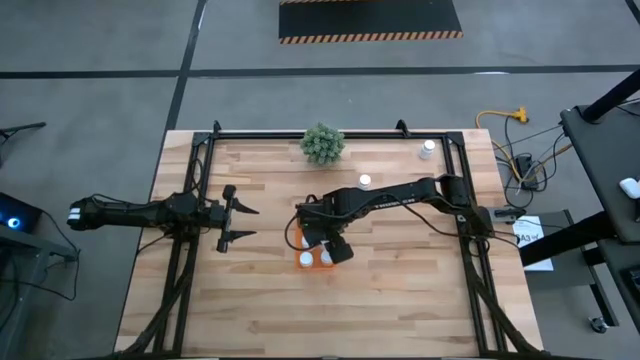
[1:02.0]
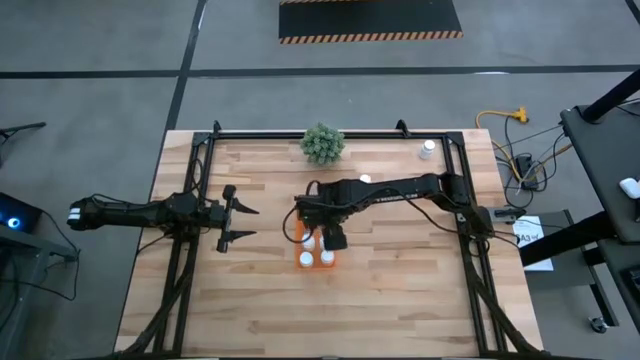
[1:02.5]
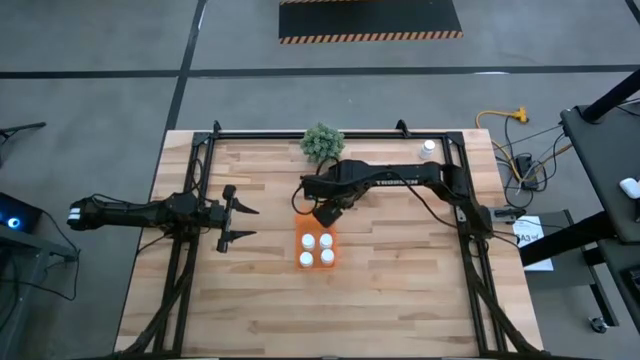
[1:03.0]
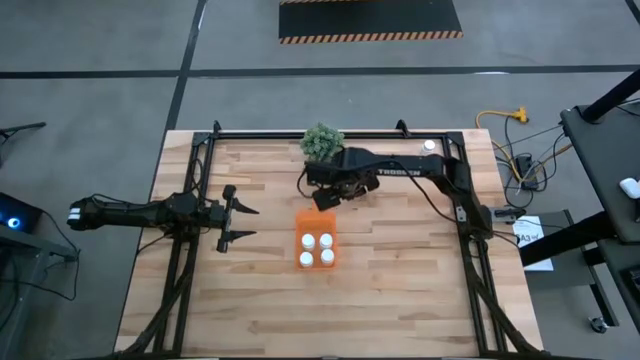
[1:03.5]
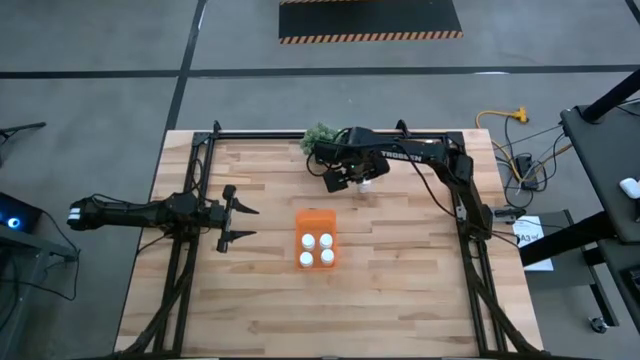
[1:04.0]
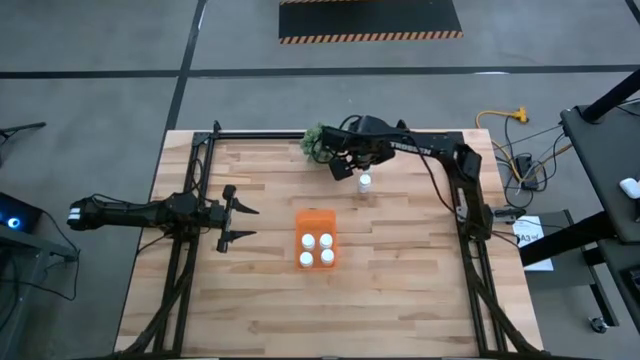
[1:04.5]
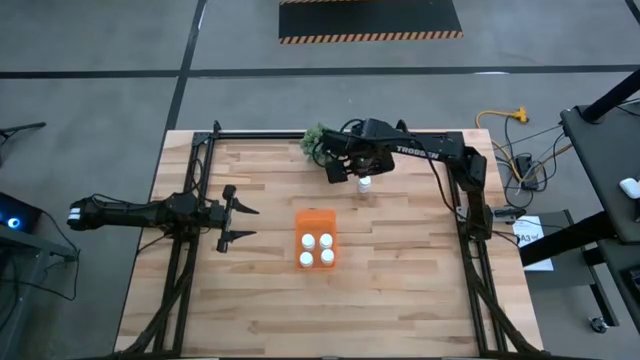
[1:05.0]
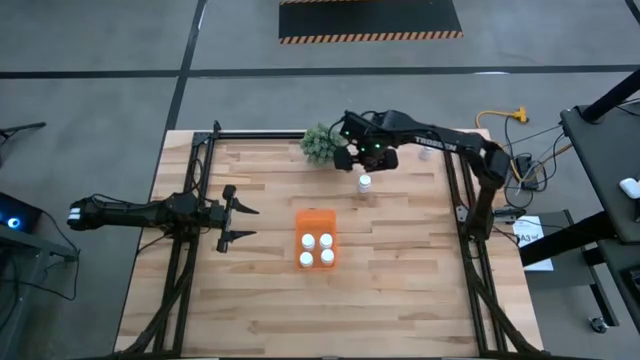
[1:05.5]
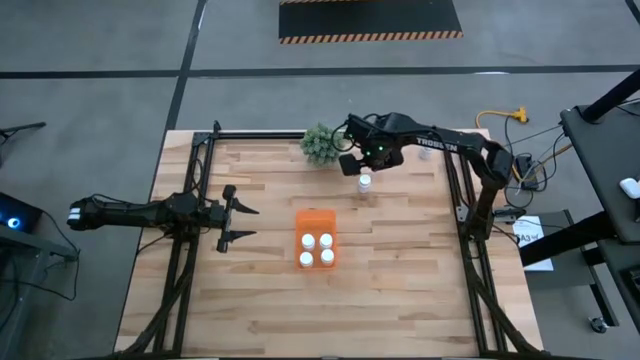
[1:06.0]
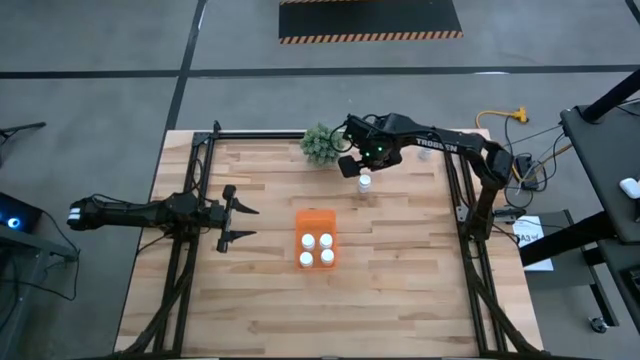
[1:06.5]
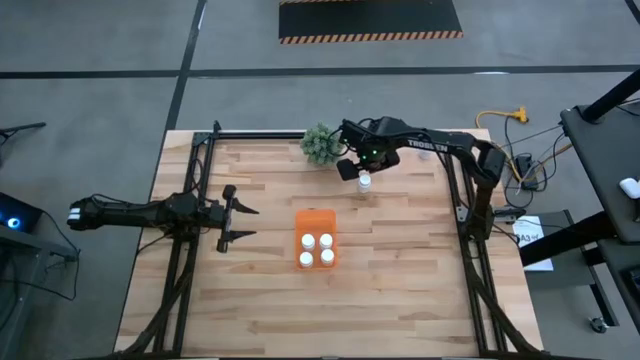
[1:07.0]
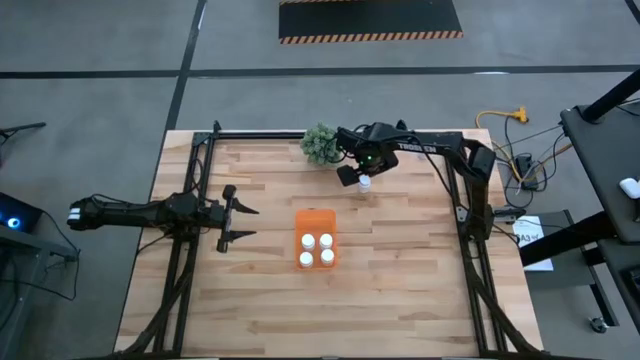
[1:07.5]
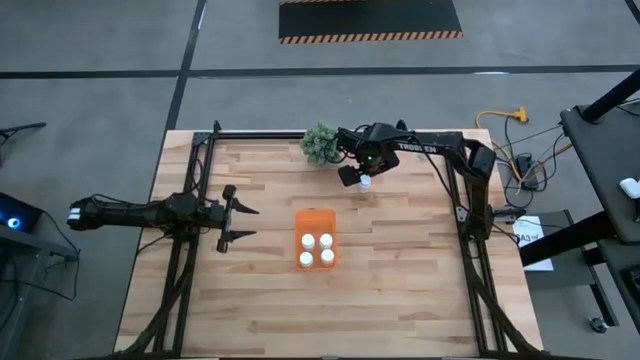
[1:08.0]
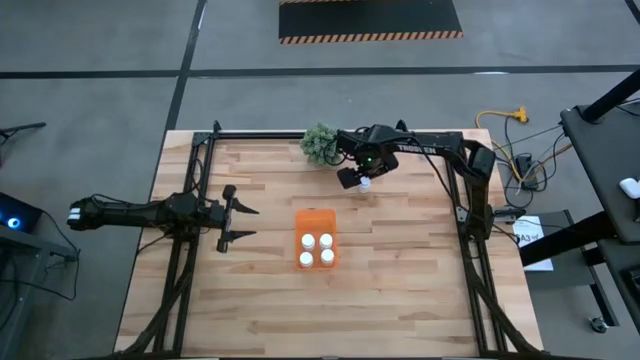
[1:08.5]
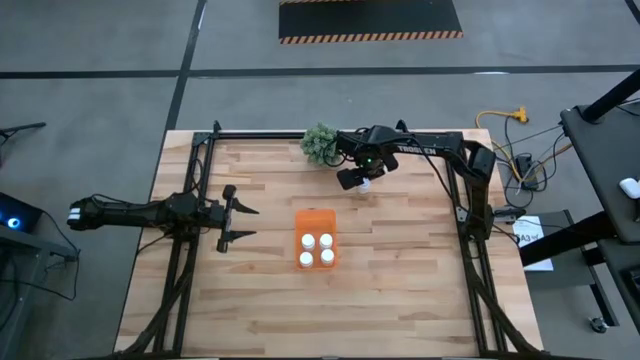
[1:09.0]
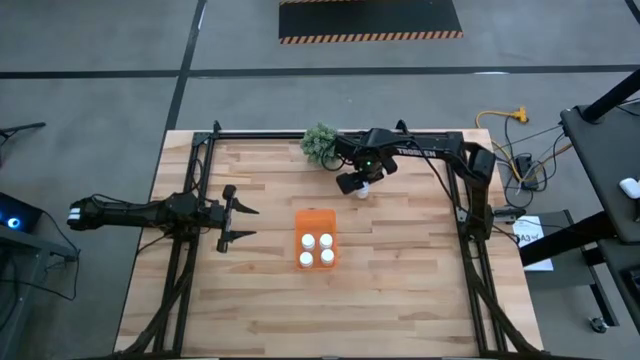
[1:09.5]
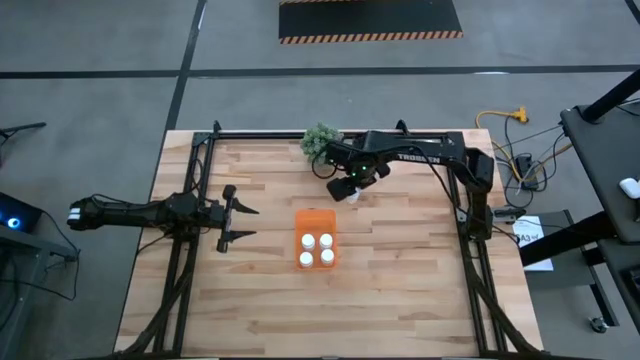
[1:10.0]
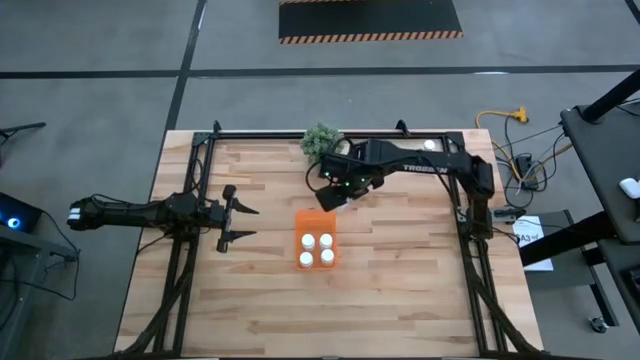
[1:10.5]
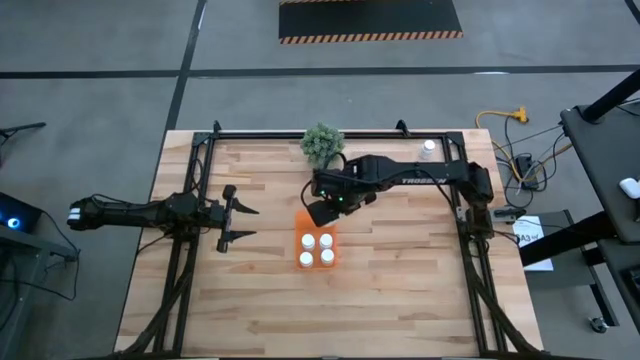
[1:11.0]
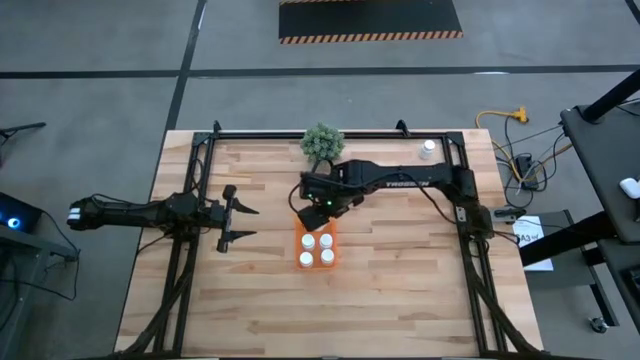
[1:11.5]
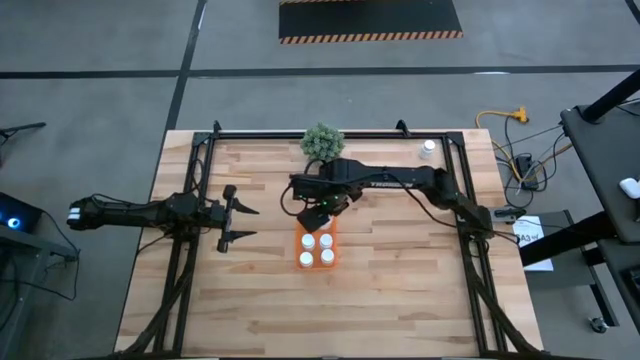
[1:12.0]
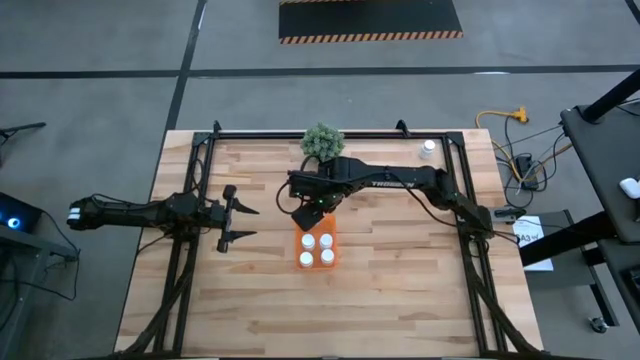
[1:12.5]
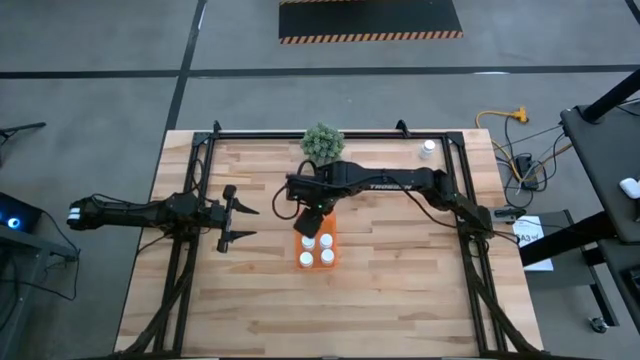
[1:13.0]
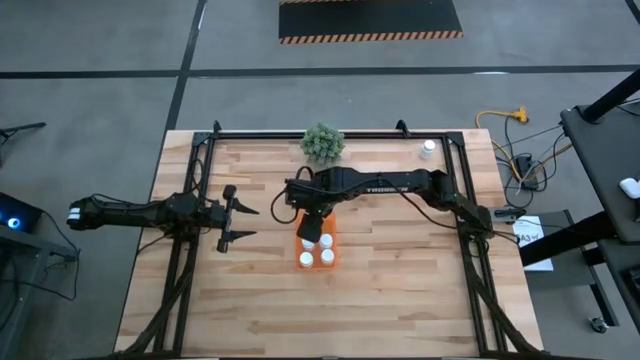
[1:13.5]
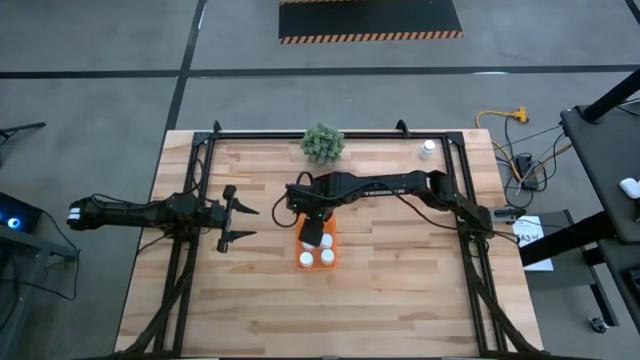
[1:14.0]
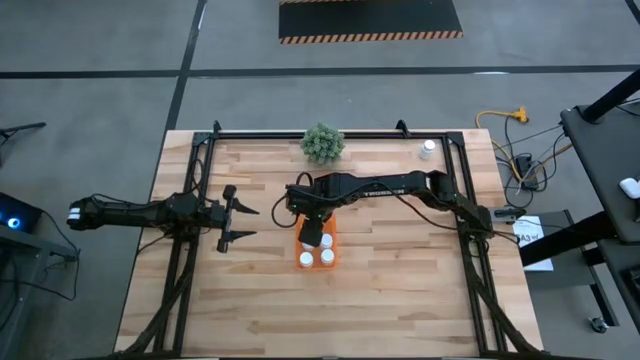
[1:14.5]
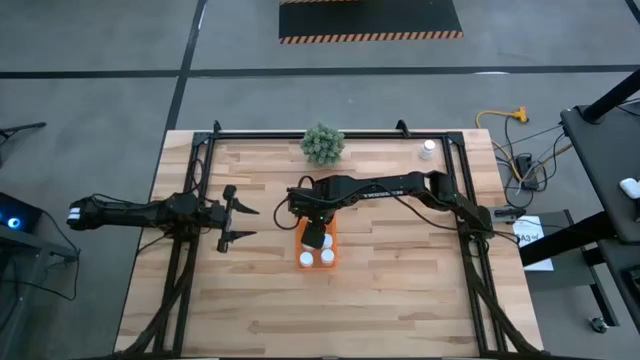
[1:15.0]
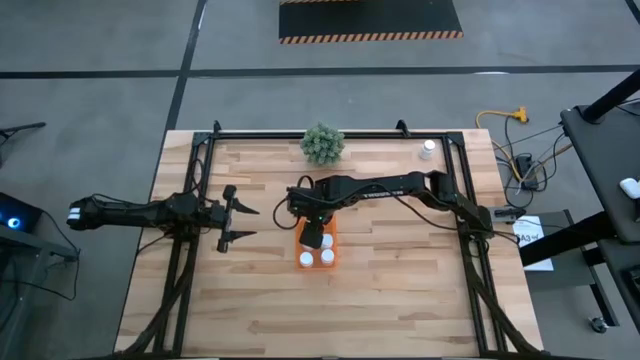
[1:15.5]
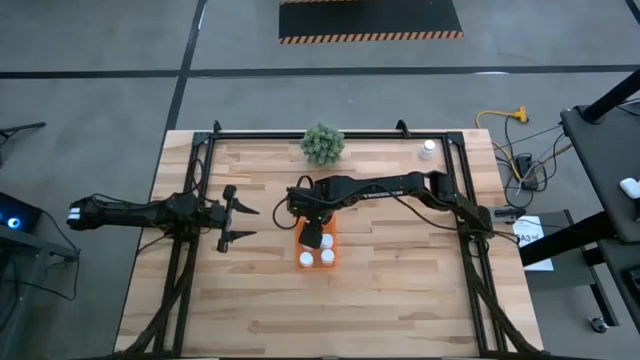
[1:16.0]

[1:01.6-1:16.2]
Task: Pick and place pill bottles into a basket
Put the bottom white pill bottle into the orange bin

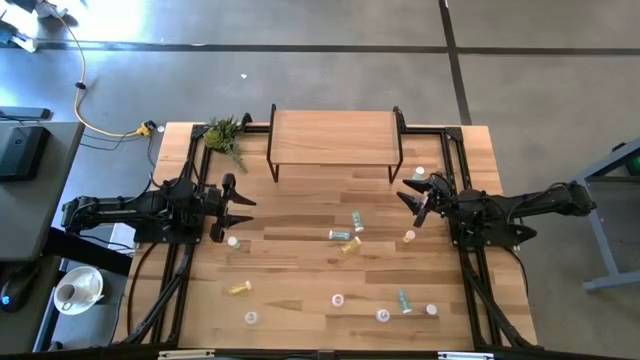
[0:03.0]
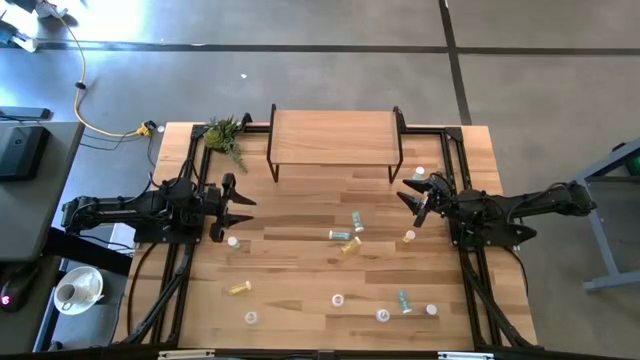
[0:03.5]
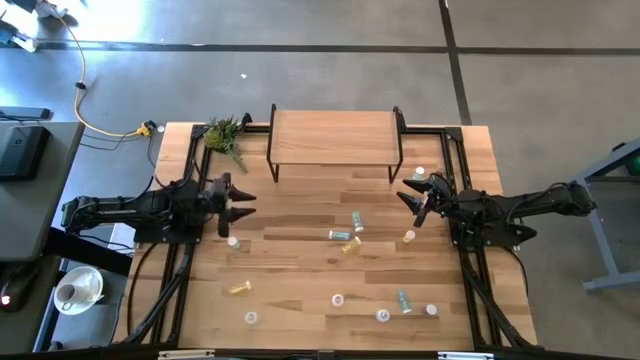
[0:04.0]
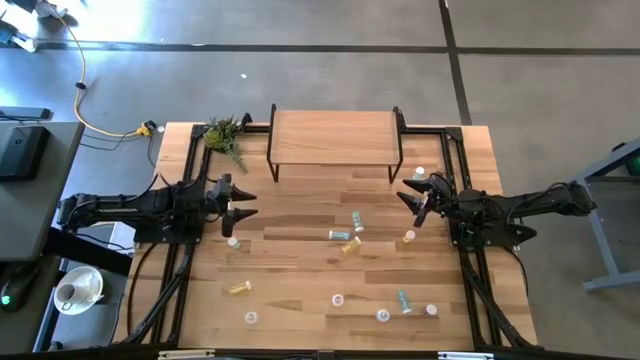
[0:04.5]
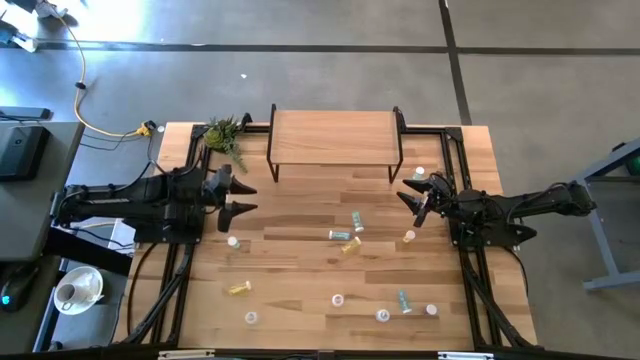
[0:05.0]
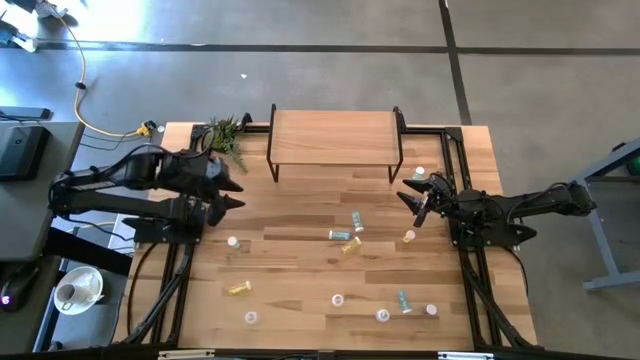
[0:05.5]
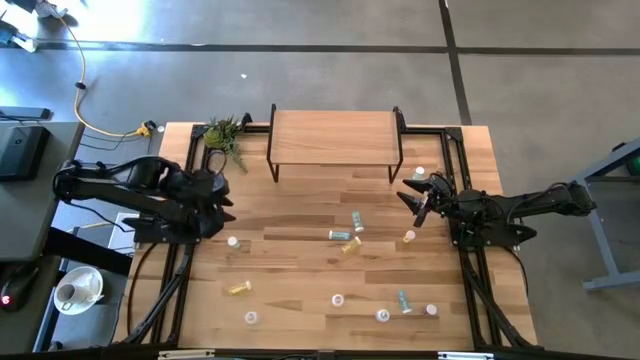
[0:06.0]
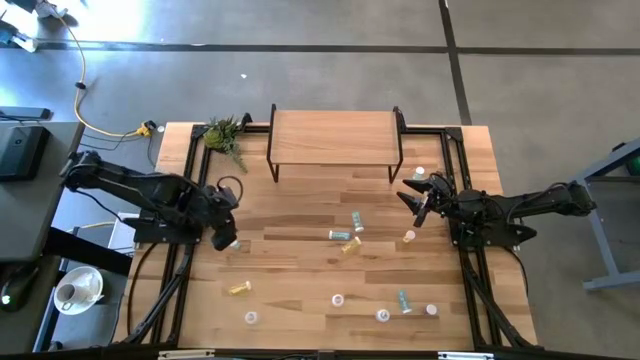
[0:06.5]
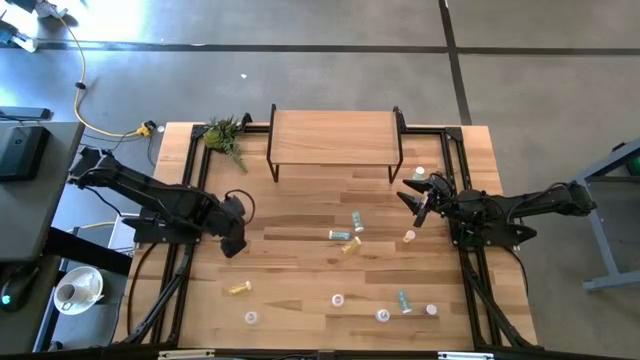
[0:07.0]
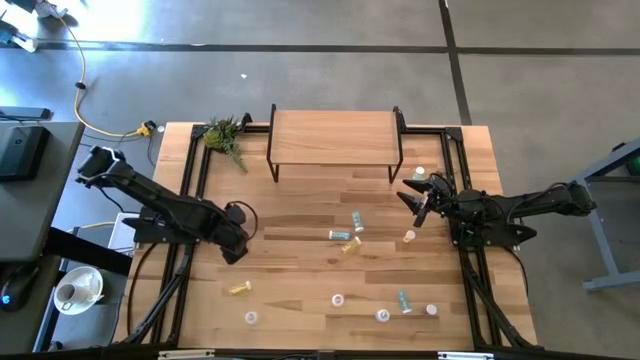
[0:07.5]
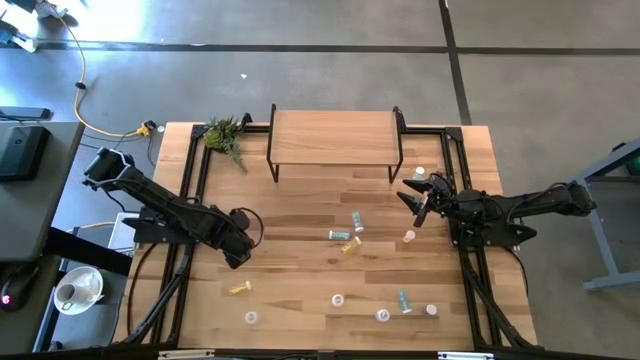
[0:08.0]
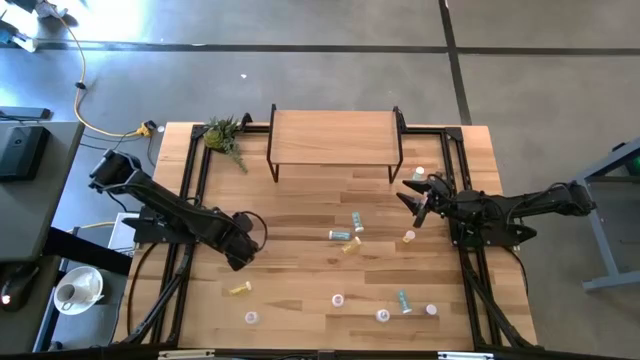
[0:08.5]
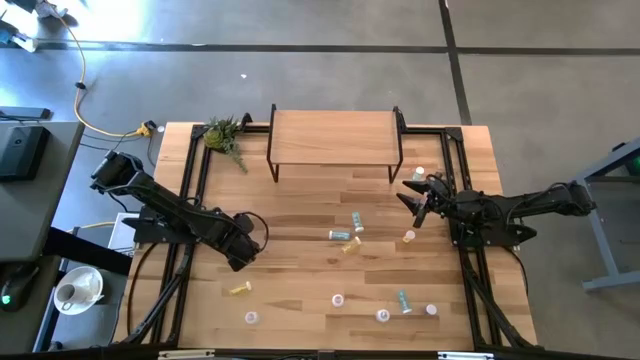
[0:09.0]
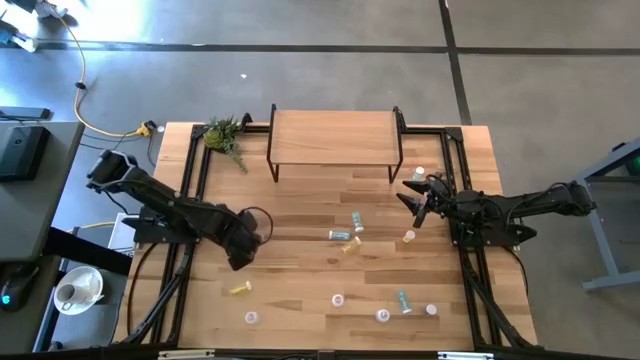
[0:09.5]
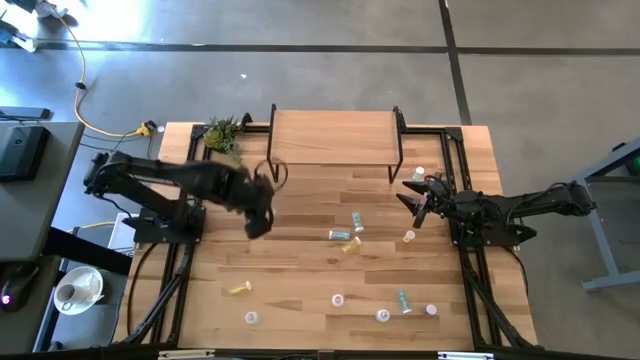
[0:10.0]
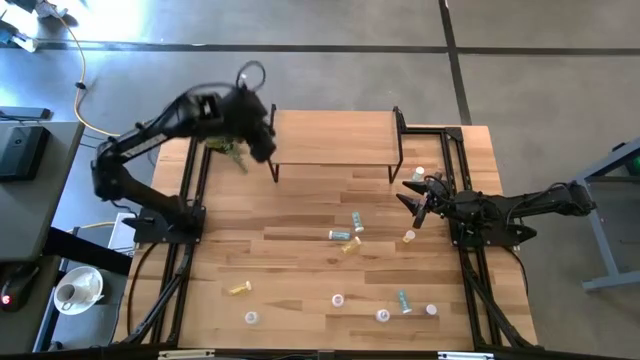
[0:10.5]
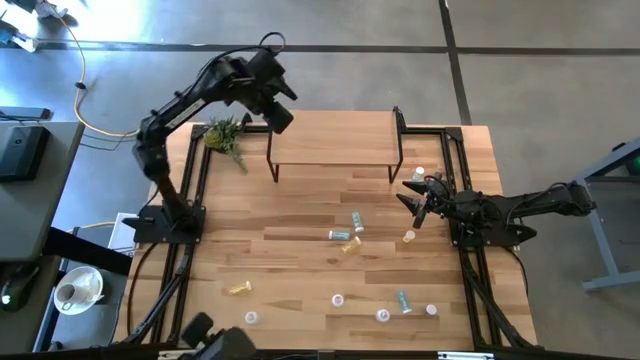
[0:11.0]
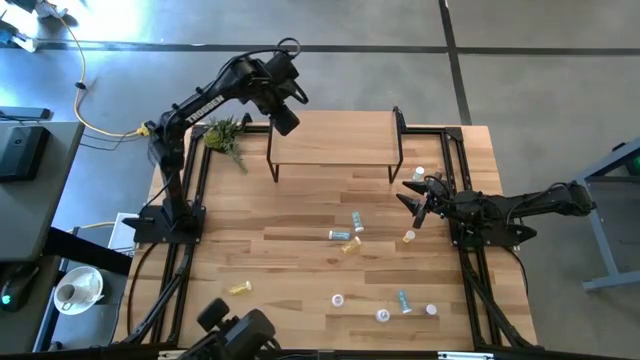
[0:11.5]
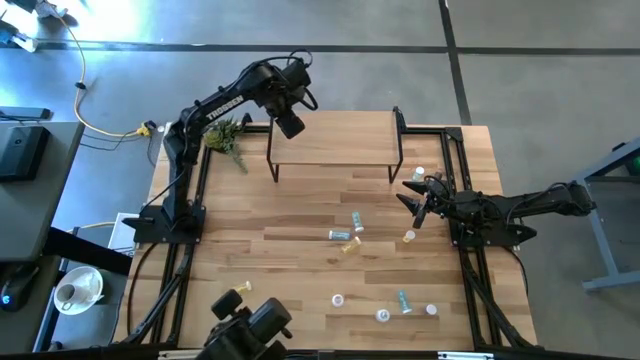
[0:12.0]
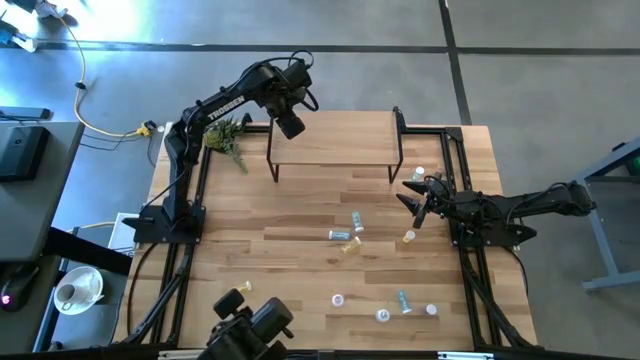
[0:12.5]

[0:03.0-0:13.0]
Task: Pick and place medicine bottles onto shelf by color
Put the bottom green pill bottle on the shelf
